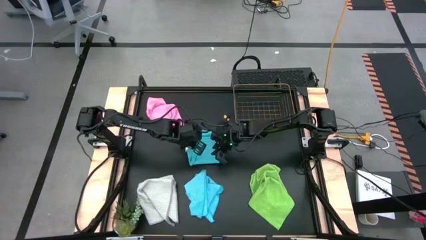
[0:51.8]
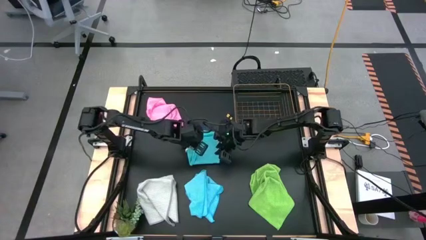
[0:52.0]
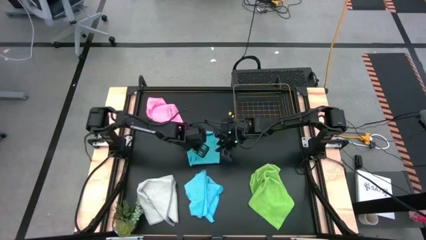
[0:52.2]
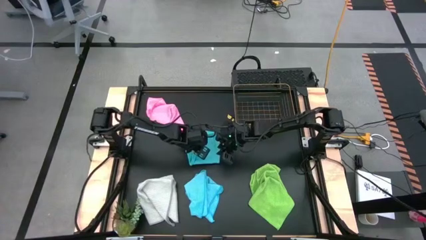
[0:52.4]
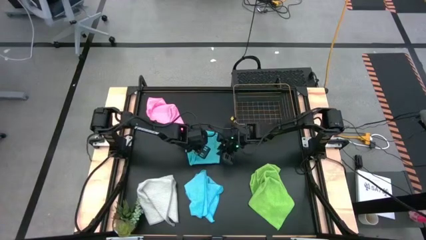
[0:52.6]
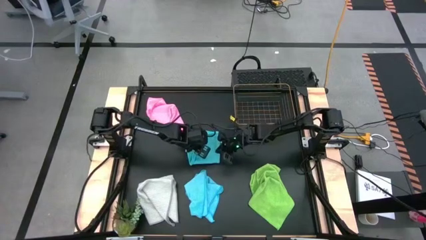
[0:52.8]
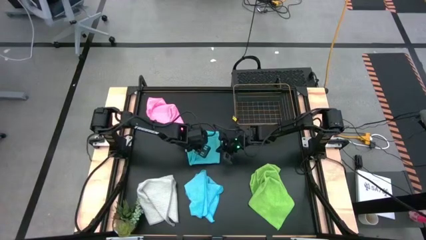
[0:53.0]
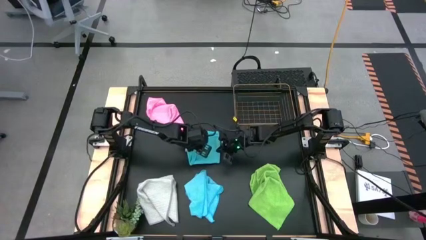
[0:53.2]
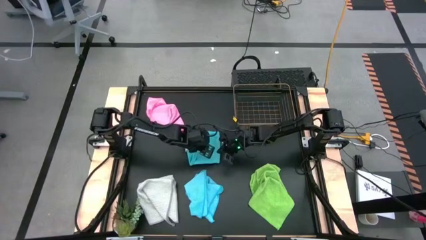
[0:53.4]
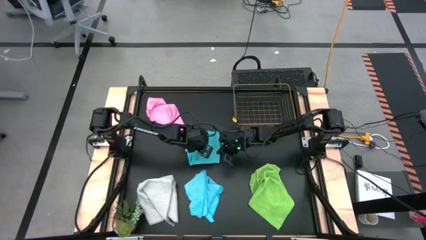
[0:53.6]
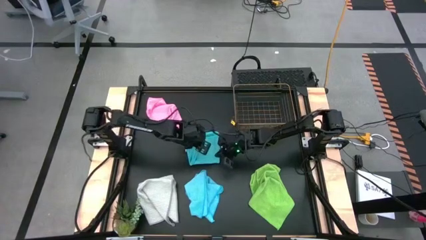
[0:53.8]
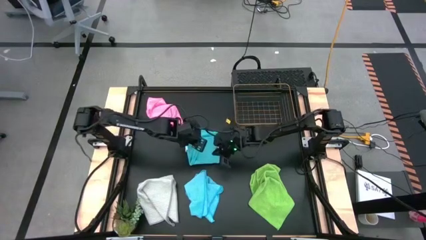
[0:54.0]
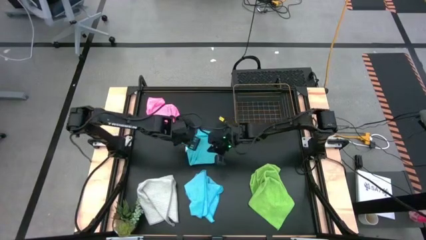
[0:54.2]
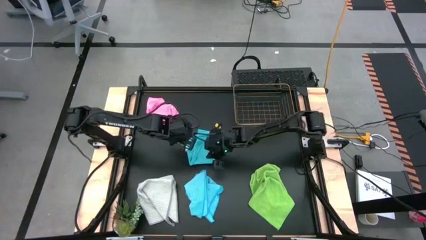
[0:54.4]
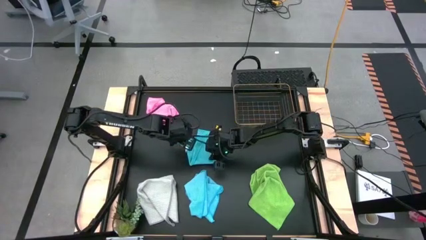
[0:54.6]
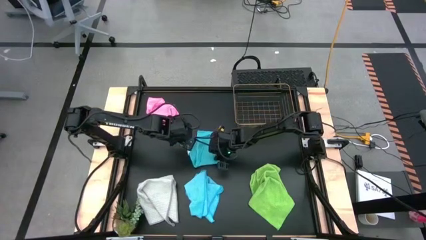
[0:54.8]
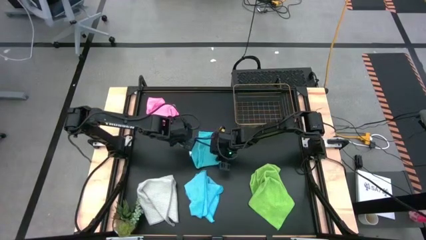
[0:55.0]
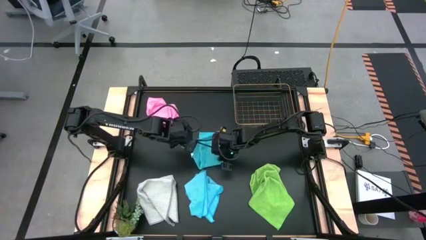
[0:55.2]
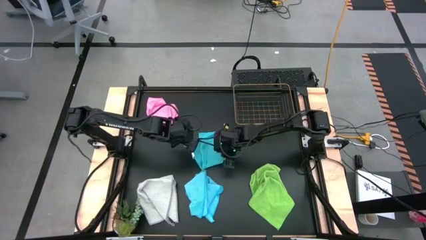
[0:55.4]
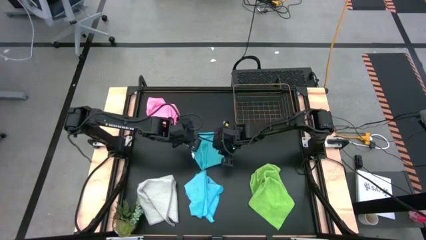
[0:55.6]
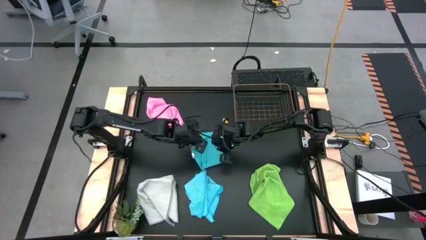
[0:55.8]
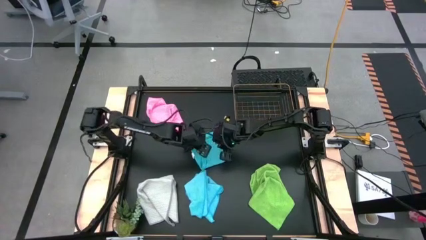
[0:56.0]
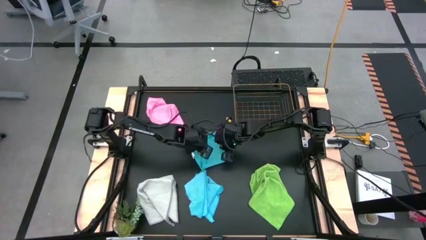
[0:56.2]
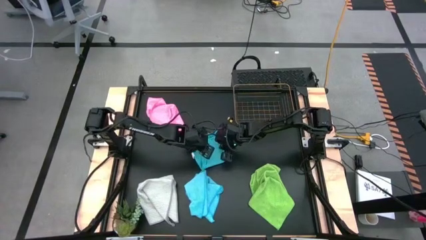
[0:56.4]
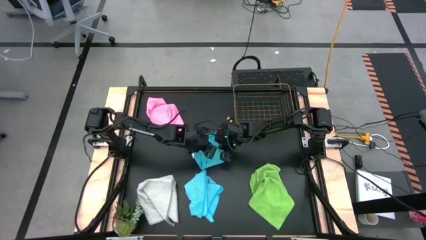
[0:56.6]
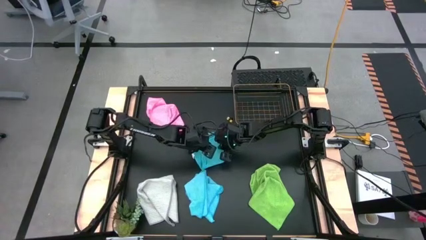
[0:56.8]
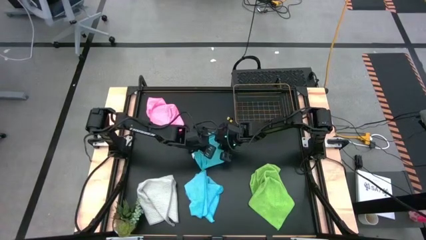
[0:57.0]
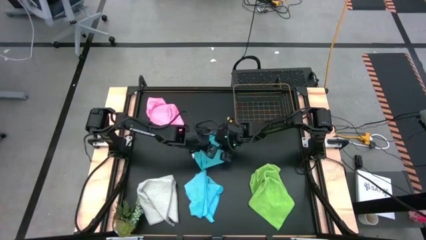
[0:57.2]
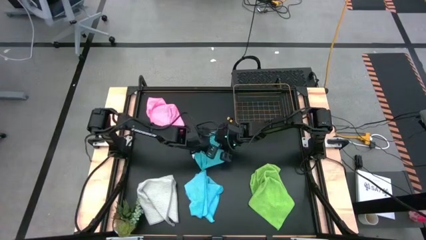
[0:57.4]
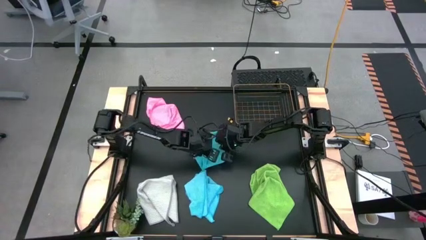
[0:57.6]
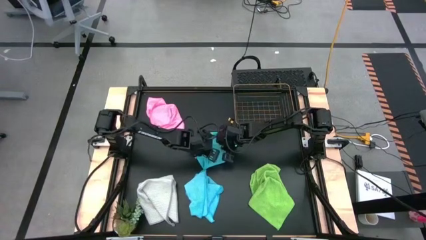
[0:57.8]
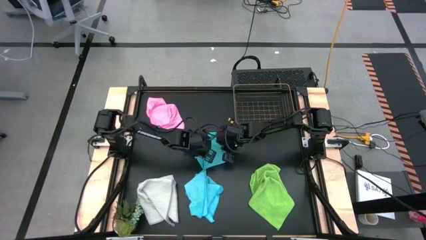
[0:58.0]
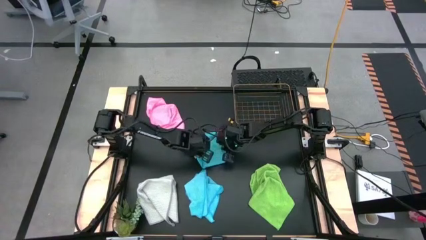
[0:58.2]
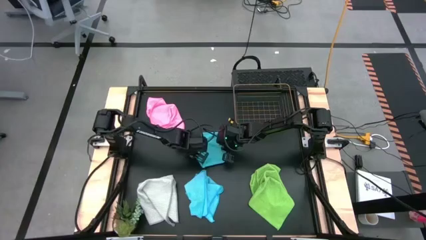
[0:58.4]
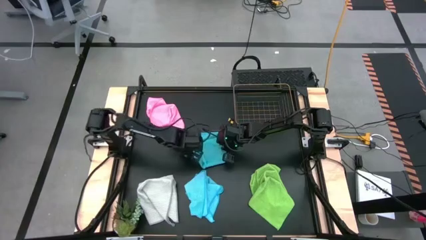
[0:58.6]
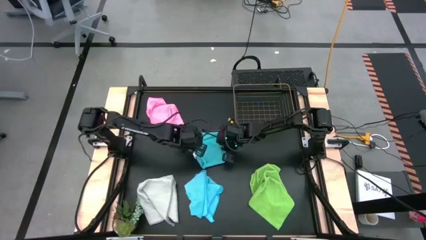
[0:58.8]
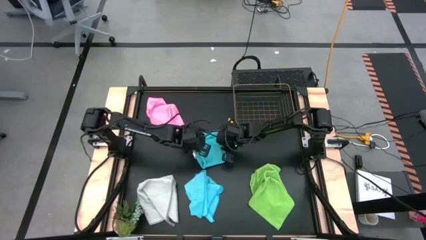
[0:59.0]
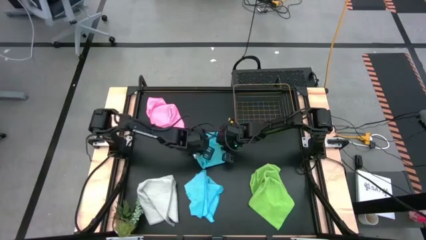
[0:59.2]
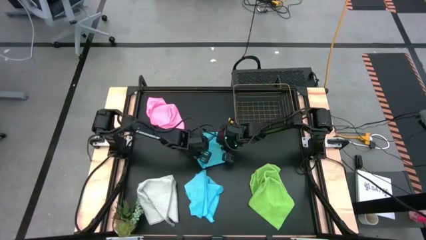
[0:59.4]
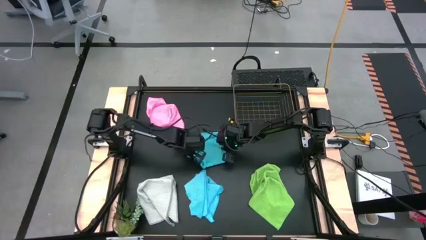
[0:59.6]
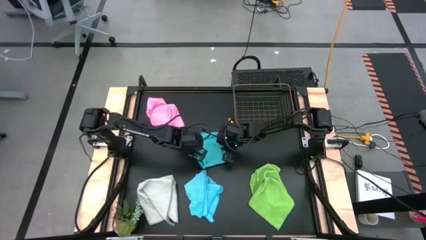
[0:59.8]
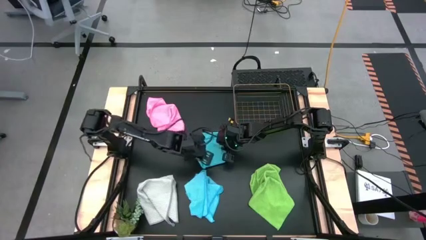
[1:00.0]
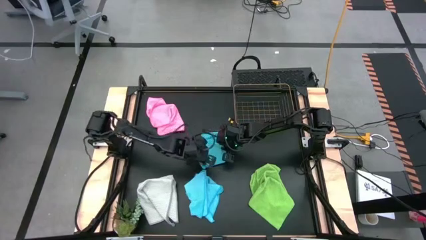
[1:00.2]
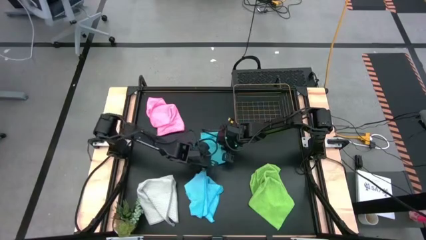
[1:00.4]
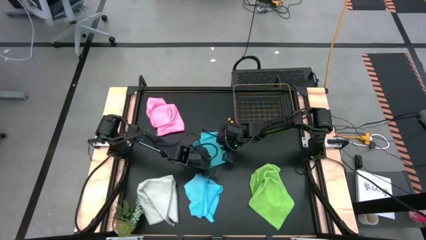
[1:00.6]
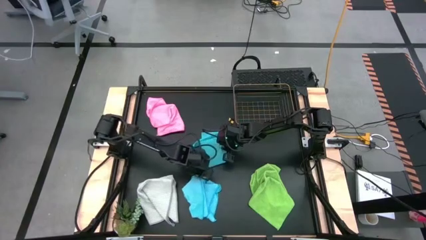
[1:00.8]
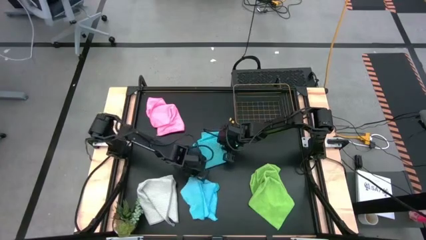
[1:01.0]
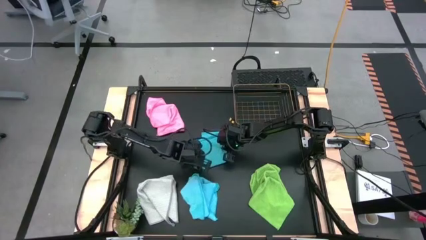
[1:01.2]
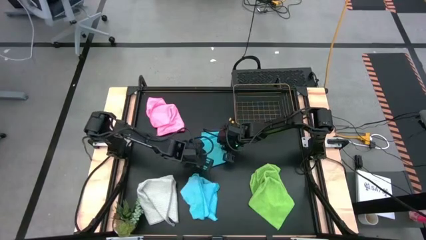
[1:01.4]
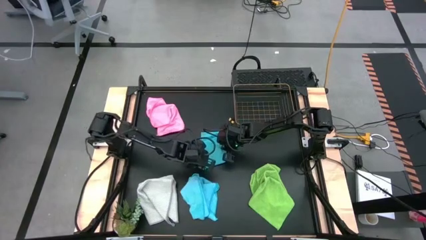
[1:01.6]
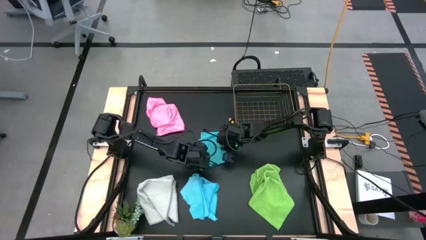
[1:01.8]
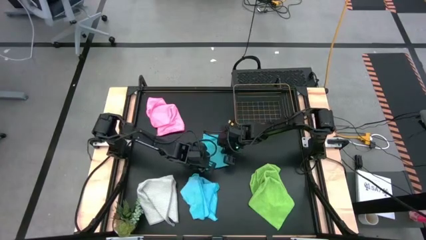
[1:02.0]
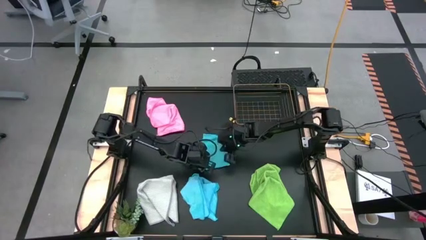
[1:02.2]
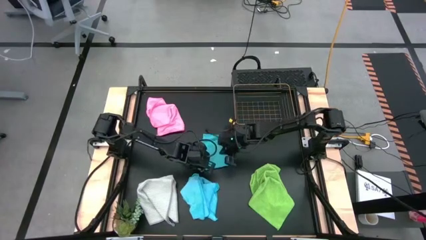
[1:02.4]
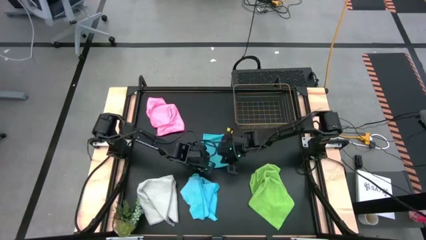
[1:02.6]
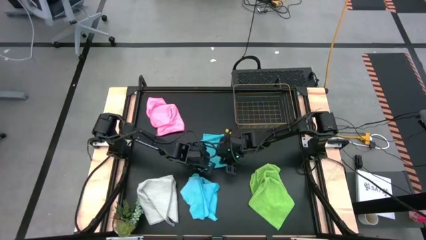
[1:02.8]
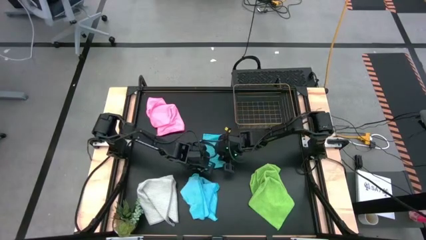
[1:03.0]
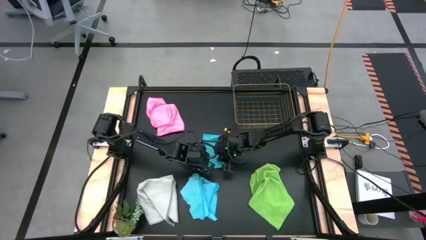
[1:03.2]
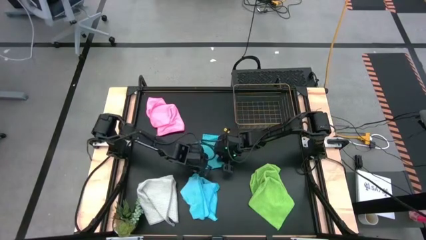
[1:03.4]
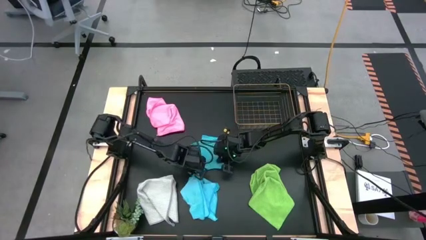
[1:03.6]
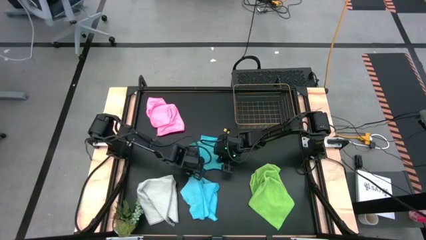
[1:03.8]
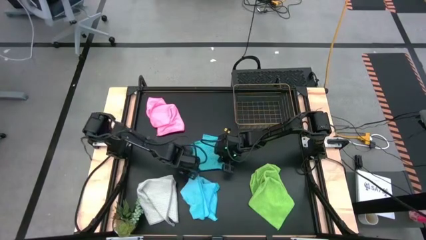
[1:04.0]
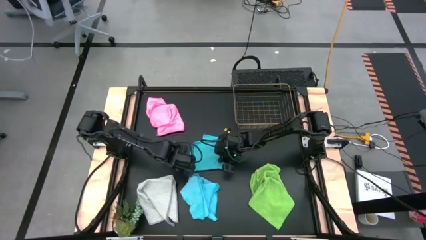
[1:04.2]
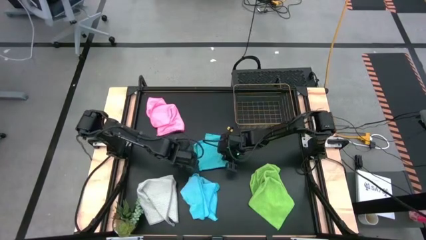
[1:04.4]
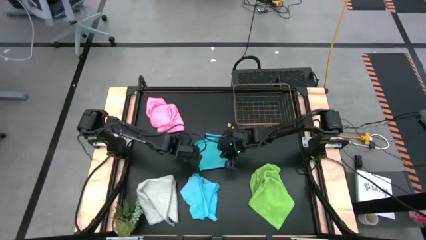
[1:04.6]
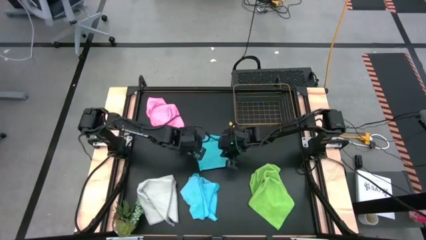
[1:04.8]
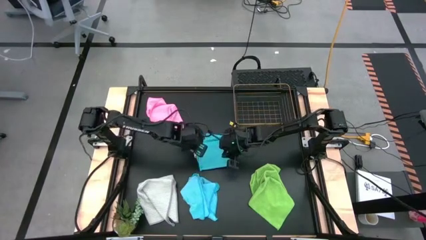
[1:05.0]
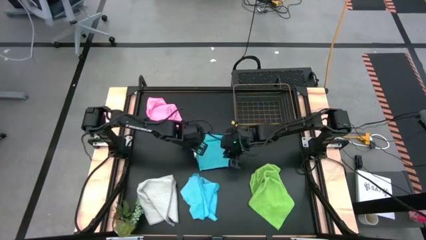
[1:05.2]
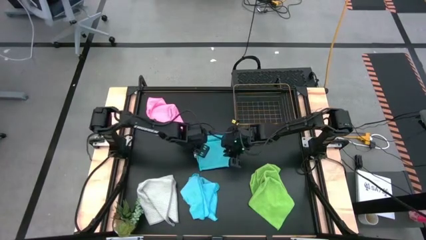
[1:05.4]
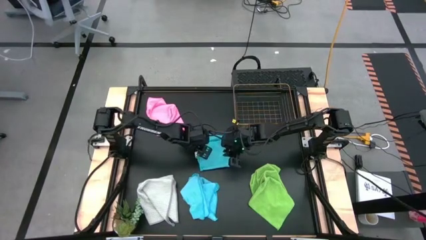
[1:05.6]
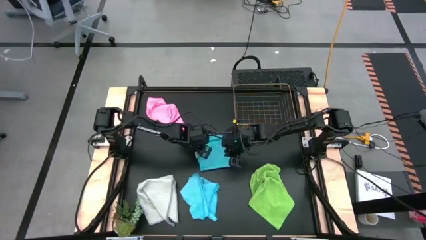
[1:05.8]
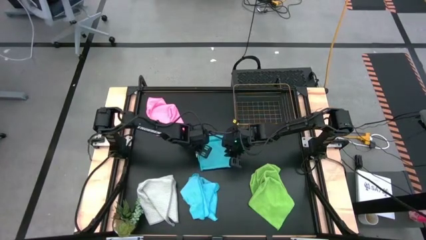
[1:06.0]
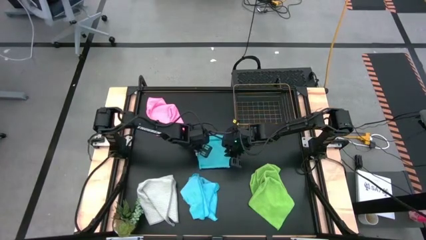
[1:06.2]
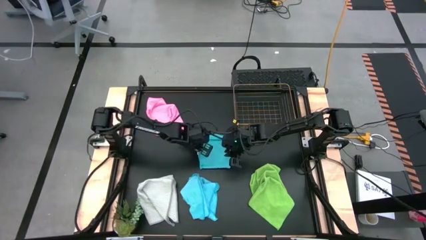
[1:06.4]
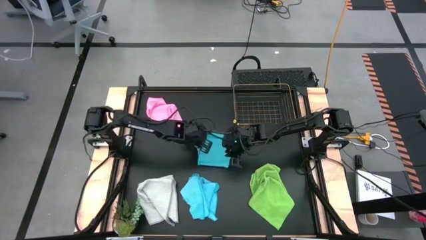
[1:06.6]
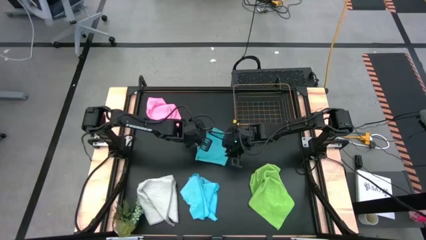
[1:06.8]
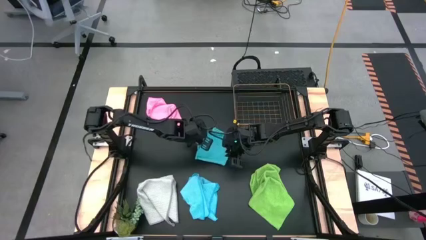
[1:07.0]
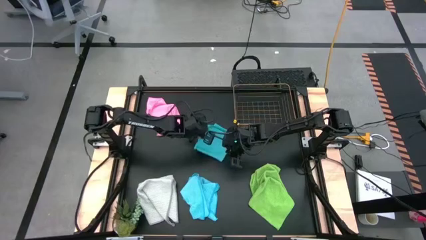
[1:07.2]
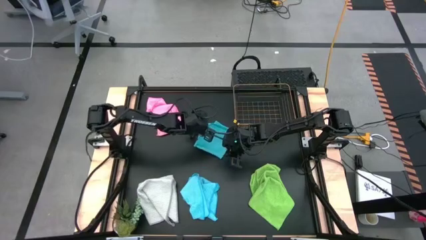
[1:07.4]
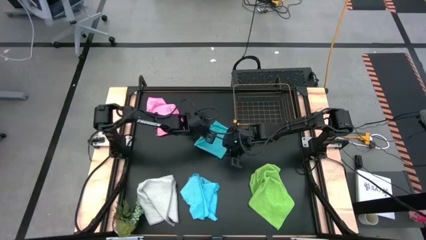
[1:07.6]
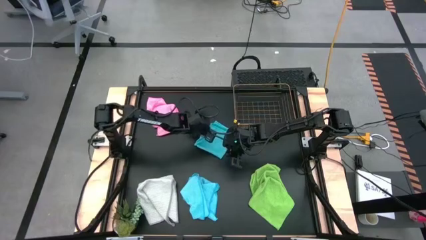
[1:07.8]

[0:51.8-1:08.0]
Task: Fold microfiber towels
Fold the top blue towel

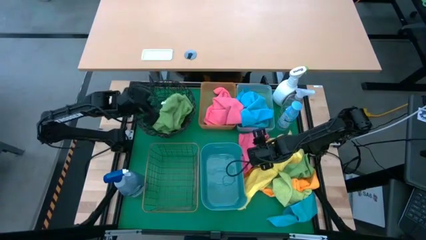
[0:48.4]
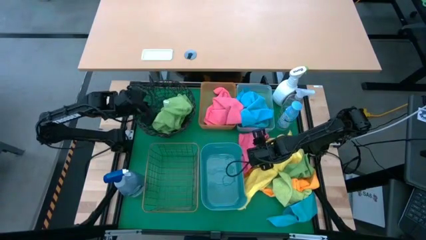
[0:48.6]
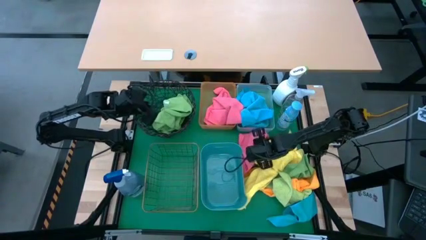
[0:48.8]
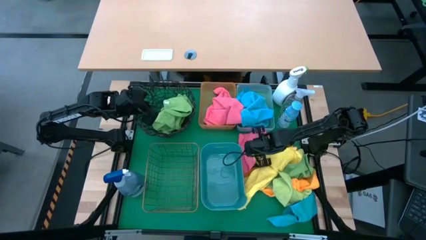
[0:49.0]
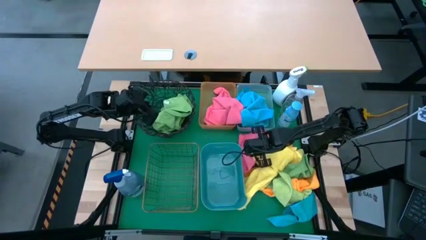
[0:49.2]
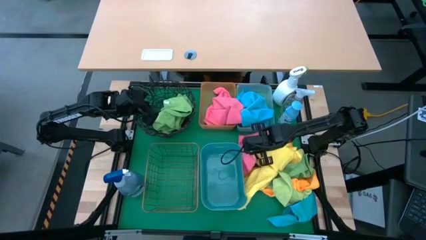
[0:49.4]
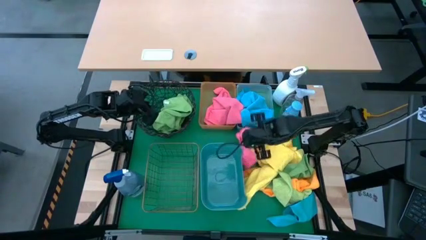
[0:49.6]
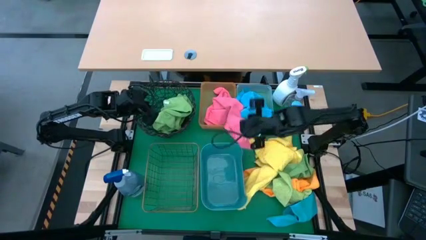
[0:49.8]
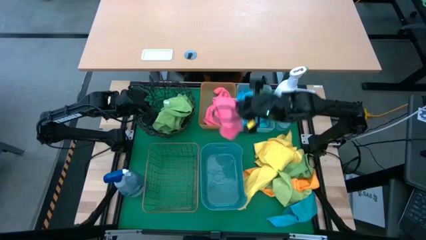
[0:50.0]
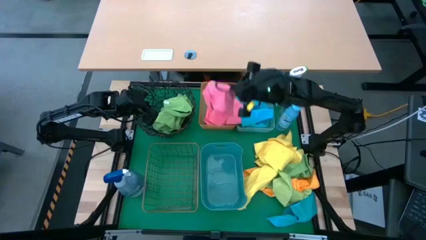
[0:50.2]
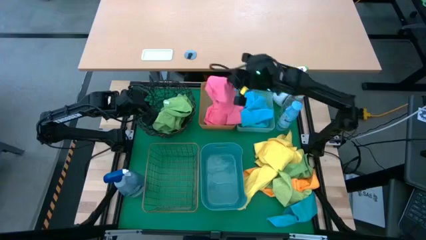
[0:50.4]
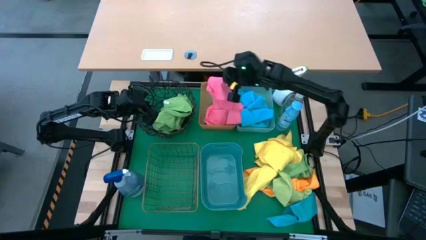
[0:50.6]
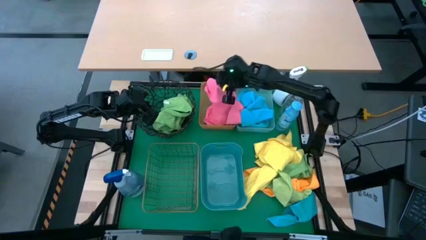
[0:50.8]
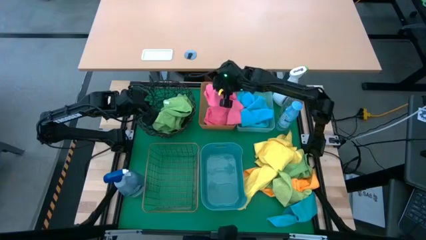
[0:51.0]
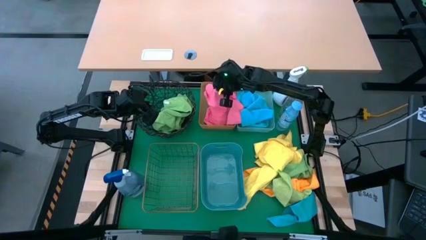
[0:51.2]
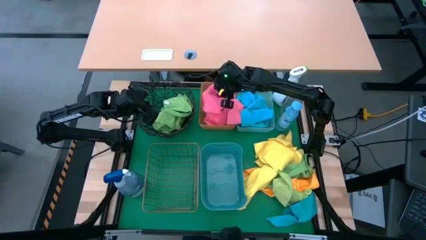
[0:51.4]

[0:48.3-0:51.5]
Task: Sort microfiber towel by color & place in baskets
Put the pink towel into the orange bin
